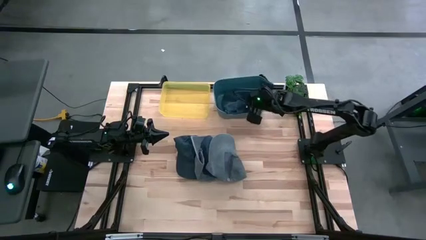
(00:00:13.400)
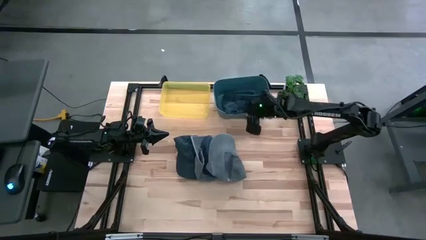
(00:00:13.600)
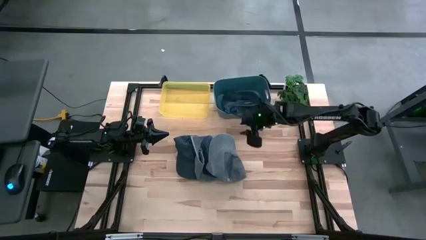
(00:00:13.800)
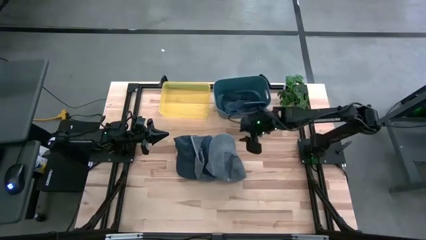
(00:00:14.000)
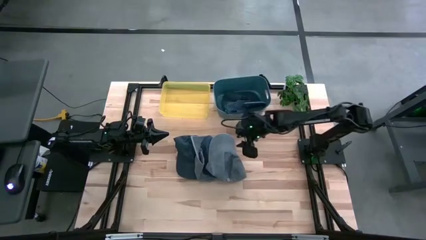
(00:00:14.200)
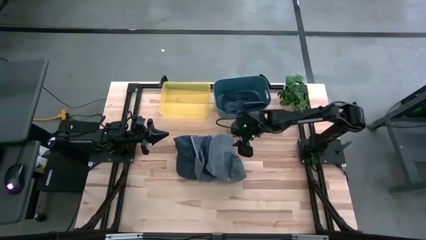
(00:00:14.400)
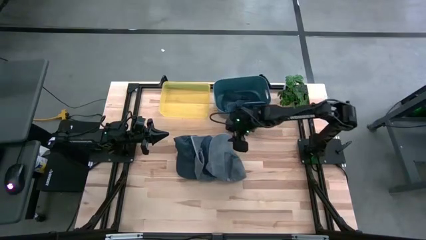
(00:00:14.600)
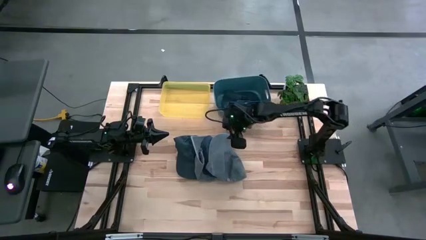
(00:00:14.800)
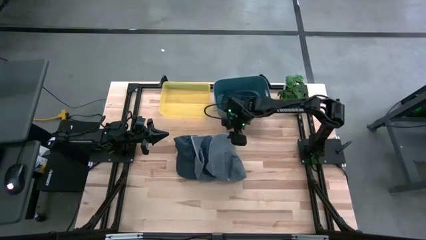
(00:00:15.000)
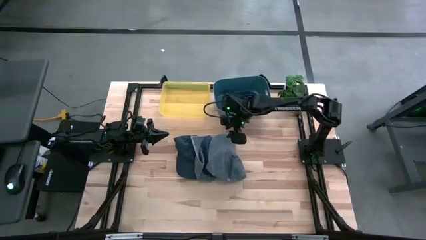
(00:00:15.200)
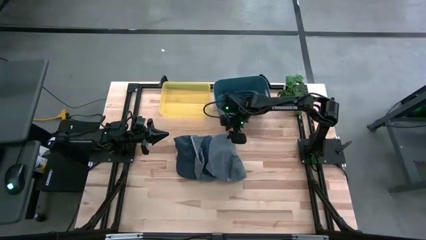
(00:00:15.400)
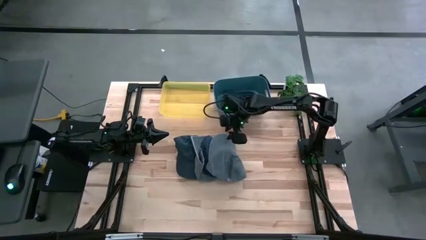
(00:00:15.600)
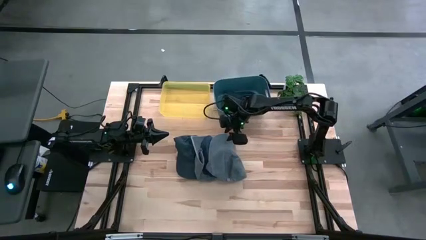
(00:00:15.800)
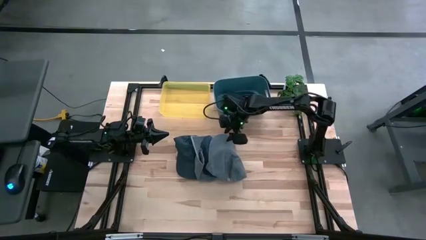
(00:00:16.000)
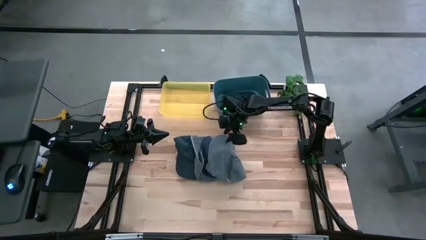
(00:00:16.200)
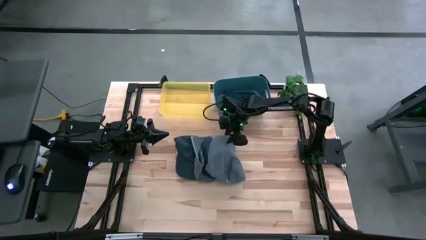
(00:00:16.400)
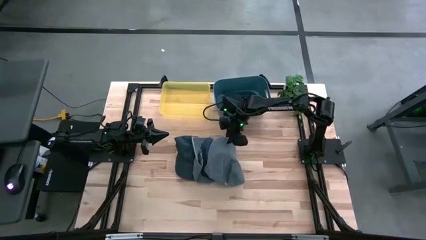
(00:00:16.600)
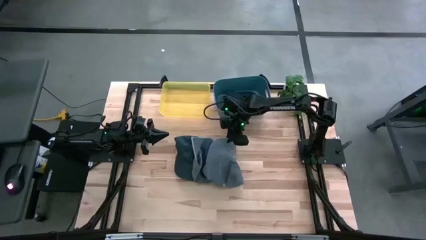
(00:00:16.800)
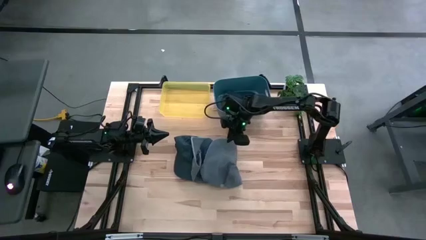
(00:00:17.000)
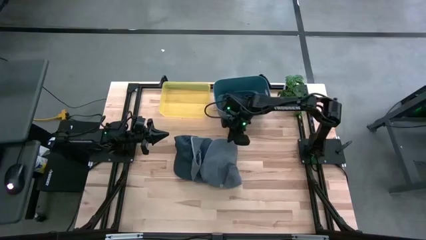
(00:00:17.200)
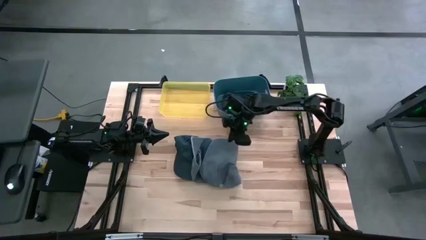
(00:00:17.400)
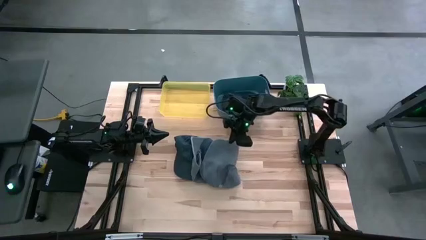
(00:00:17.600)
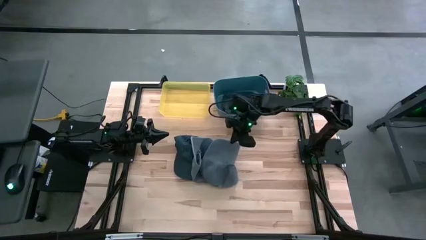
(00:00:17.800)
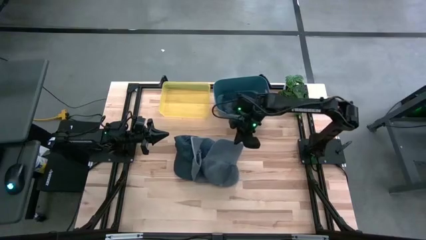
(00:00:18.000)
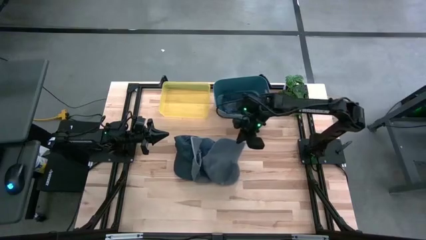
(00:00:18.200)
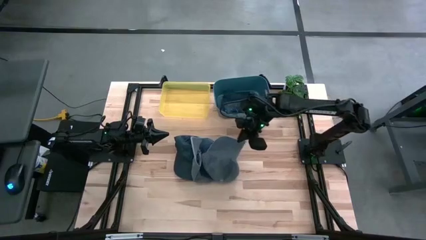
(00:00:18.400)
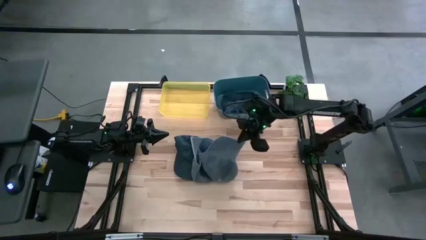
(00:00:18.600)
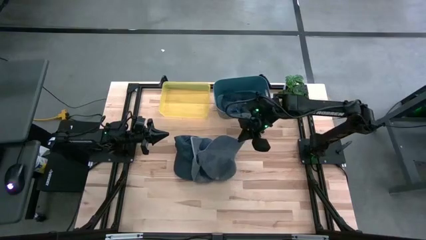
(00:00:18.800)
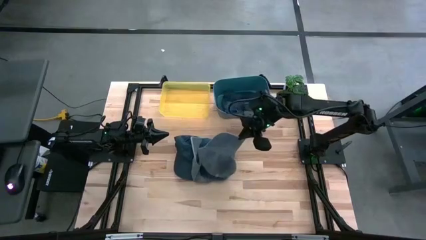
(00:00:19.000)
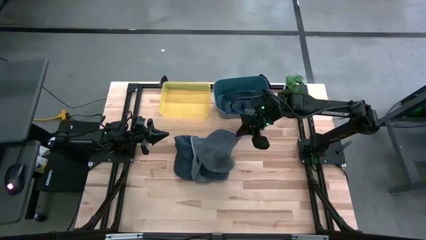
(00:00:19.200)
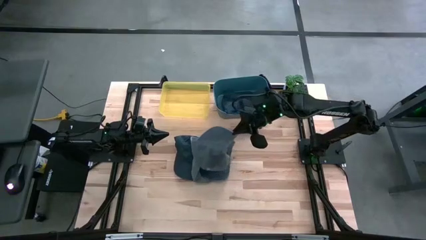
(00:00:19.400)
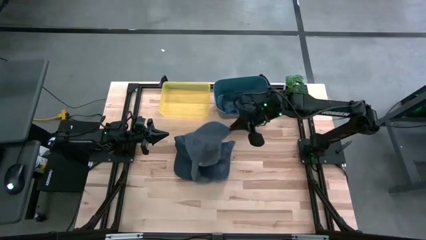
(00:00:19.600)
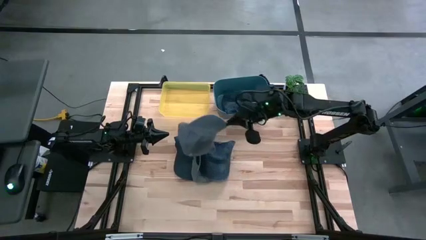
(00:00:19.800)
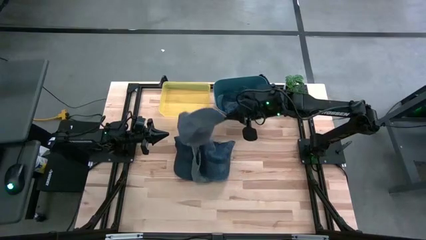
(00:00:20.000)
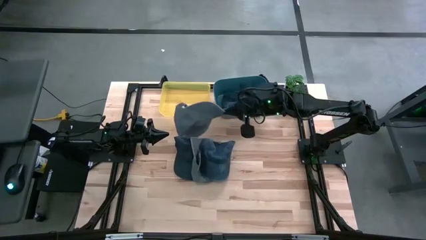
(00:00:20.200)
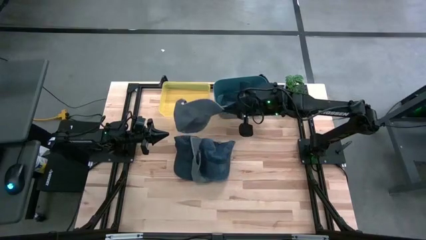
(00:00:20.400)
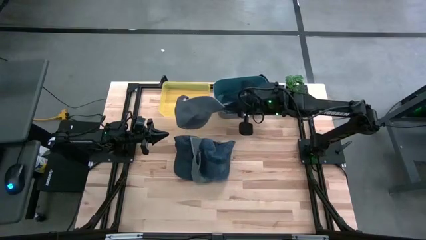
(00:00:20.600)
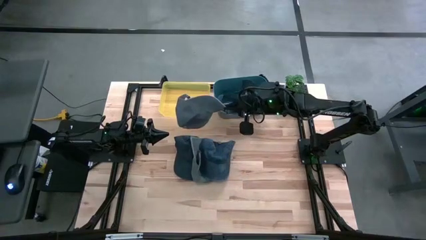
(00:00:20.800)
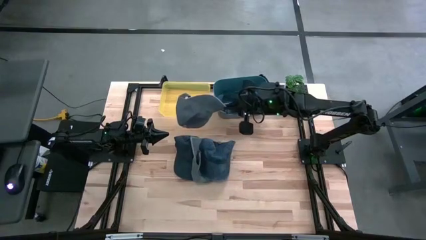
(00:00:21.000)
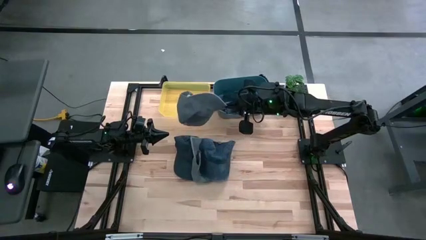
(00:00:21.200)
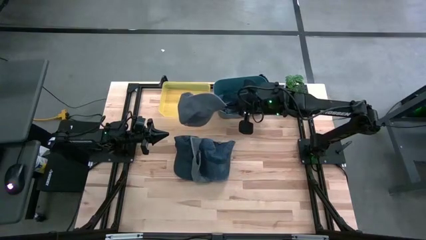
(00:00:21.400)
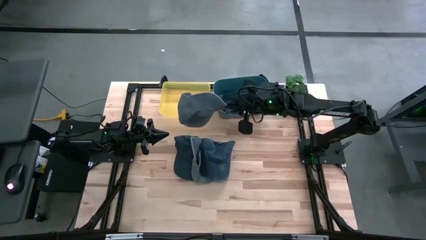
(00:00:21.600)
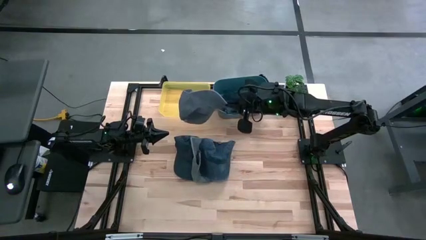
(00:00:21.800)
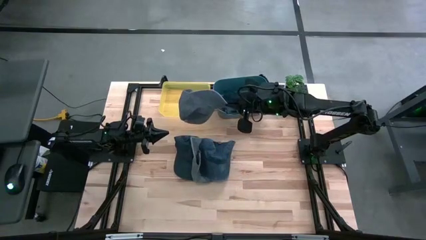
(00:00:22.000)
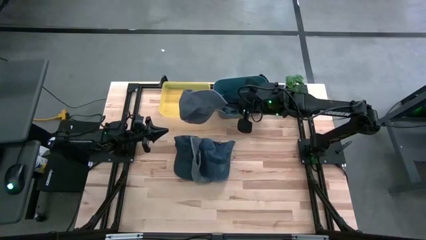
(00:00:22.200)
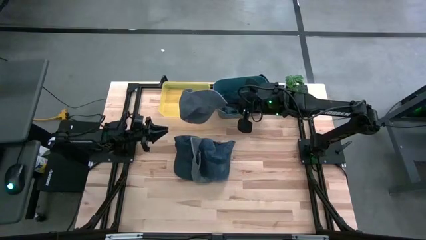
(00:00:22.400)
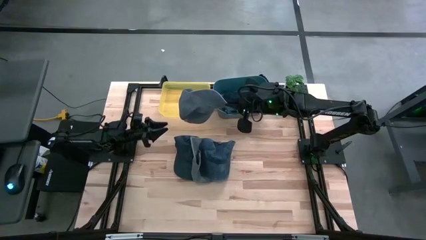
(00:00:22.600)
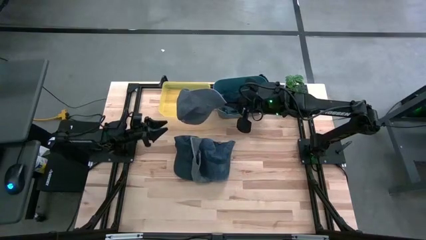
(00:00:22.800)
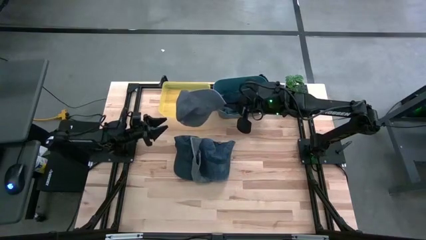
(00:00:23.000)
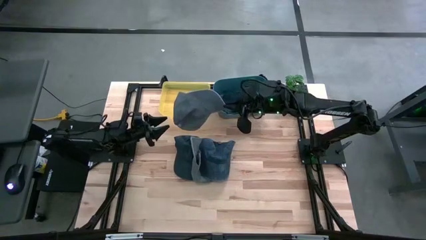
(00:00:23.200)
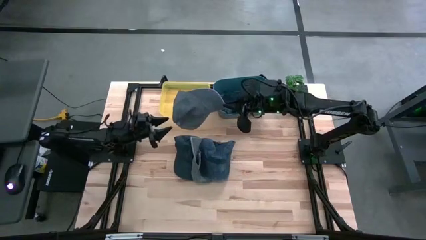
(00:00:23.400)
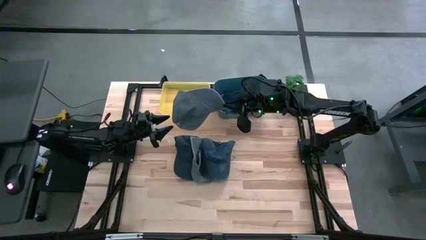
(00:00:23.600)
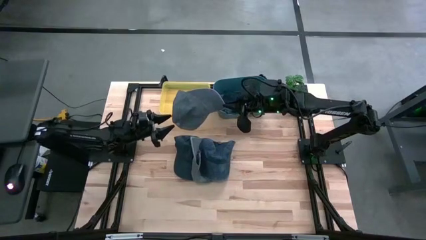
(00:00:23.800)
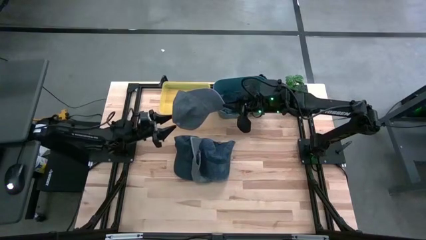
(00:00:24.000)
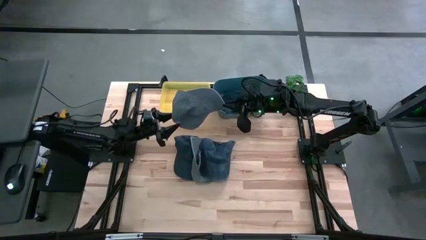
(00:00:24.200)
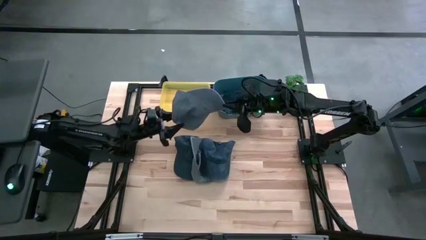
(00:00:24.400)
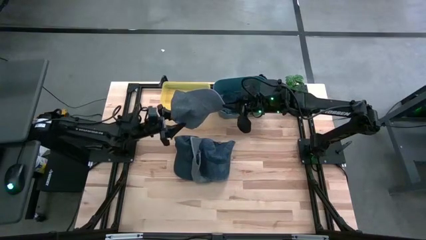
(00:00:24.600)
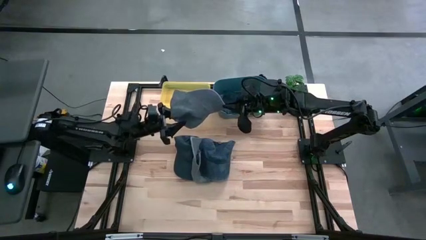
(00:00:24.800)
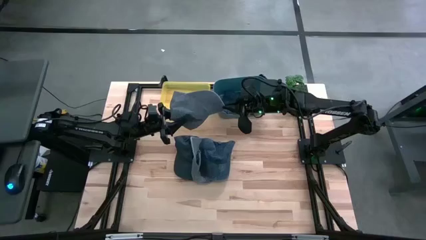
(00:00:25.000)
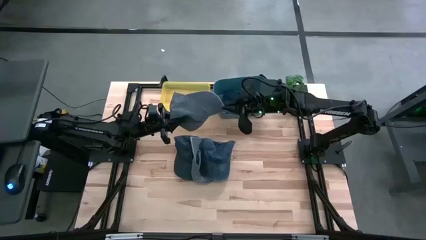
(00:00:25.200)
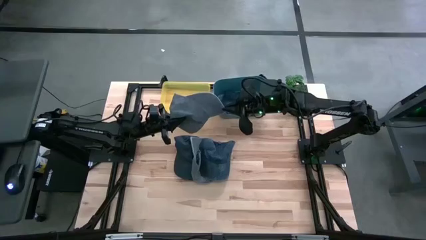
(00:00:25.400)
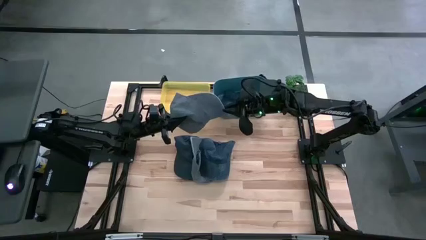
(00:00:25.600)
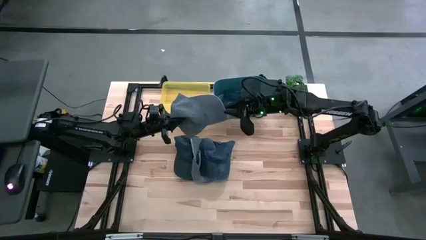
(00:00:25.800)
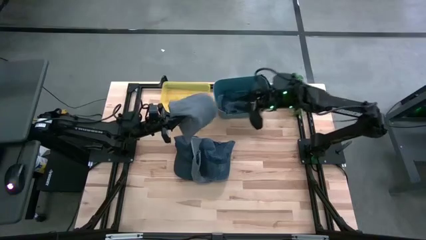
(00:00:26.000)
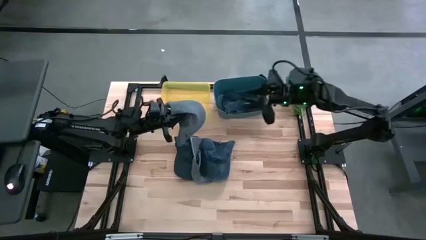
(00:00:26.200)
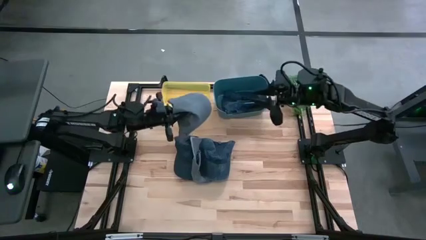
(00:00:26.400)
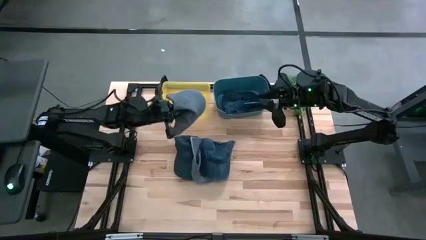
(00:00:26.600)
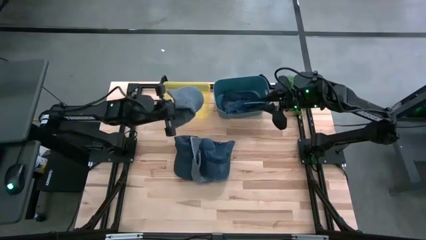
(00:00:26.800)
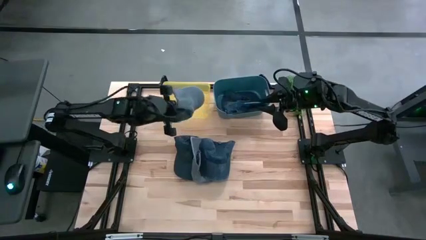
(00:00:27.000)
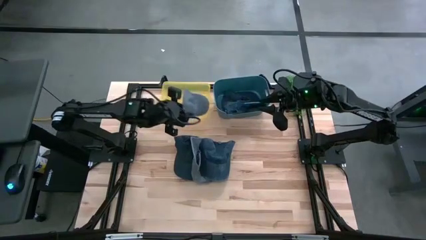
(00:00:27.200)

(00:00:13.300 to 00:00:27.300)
Task: Pick & Place hat
Put the right gray cap into the yellow bin

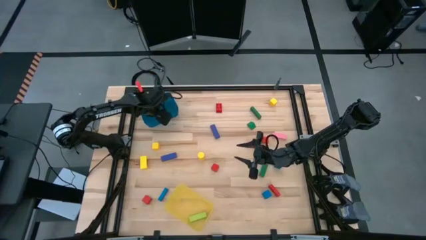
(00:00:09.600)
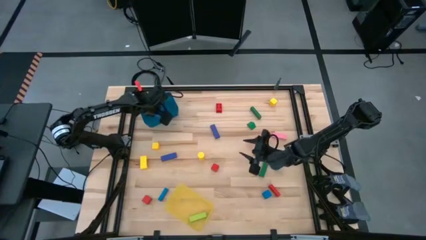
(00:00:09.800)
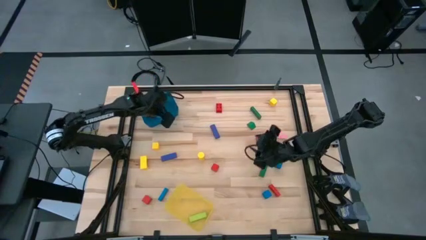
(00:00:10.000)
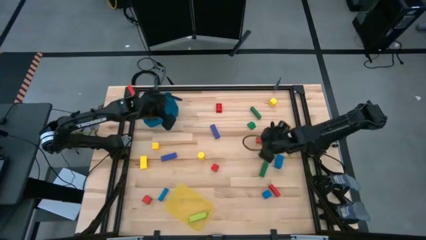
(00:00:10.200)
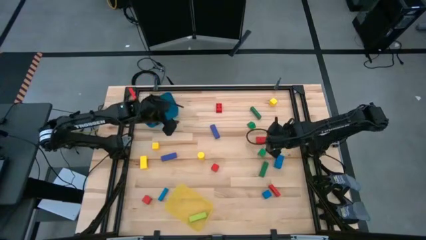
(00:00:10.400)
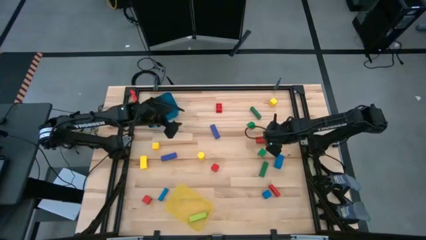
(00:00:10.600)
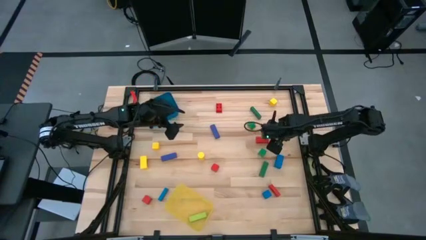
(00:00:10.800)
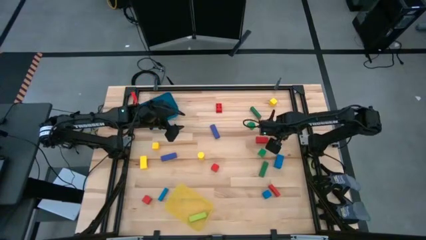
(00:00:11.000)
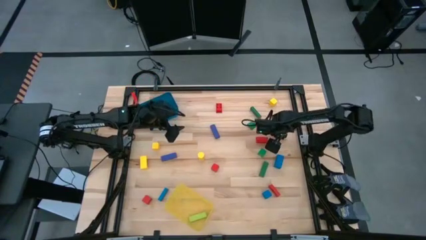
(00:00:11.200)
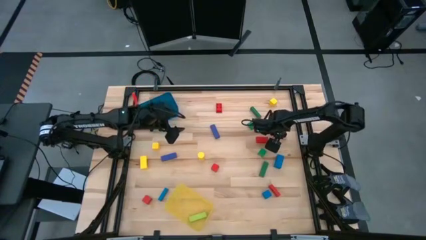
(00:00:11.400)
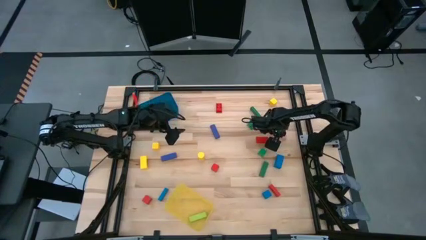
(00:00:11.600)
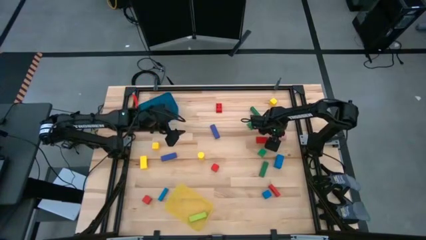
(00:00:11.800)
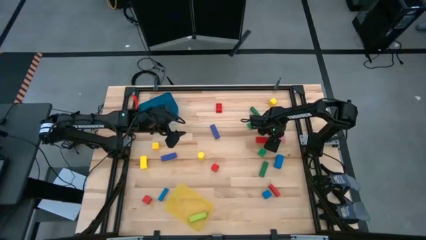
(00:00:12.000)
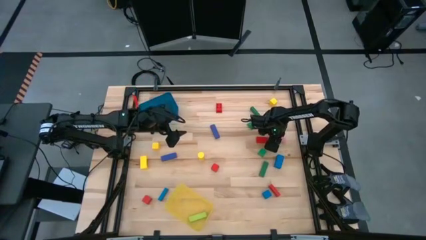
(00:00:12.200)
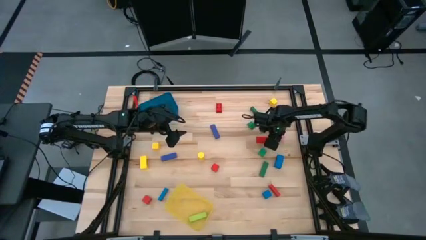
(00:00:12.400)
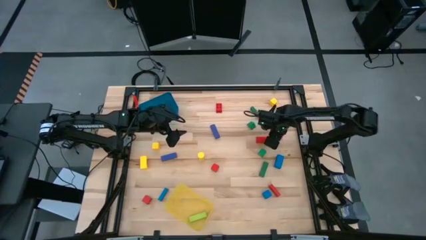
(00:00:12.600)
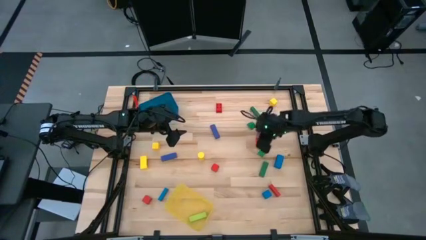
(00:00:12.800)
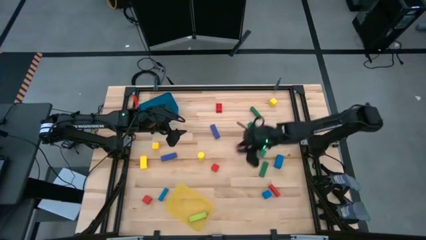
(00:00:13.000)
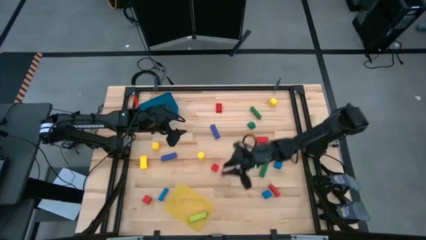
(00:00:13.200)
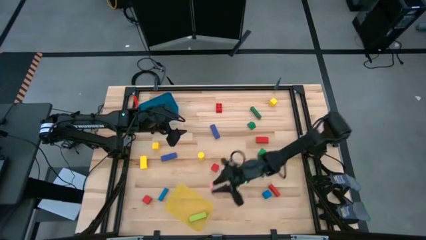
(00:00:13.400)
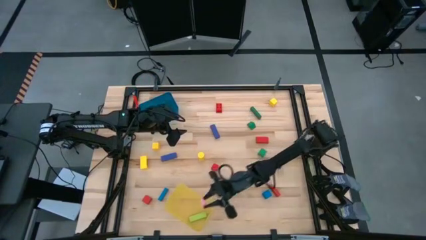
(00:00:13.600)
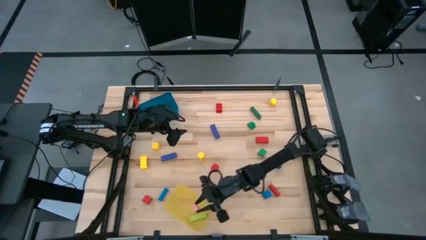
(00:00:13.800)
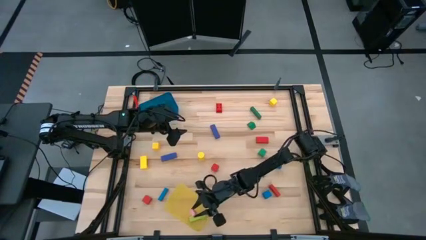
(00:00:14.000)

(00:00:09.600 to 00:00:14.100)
Task: Sort blocks by size
Put the large pink block into the yellow bin
